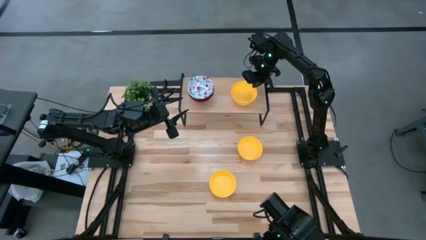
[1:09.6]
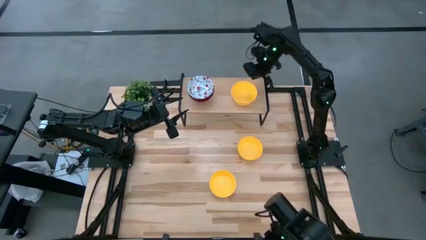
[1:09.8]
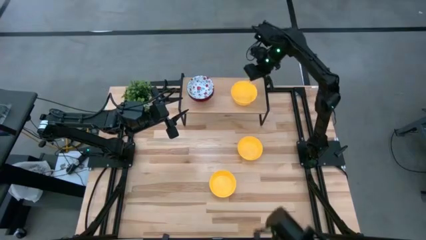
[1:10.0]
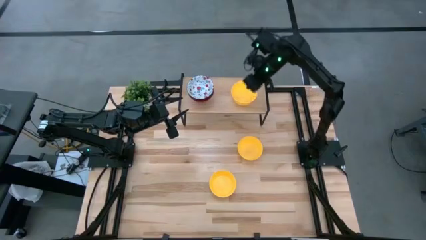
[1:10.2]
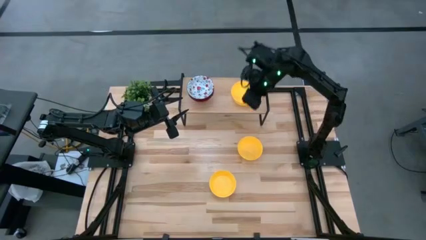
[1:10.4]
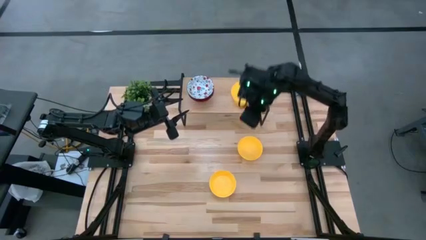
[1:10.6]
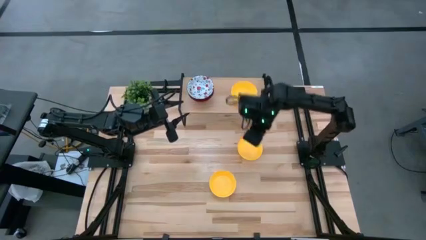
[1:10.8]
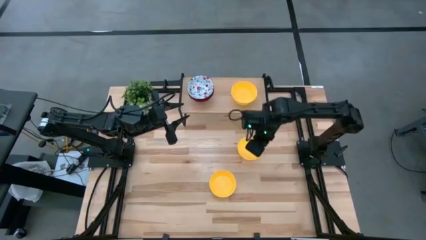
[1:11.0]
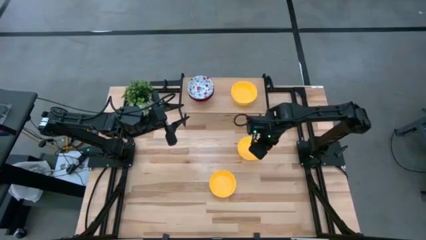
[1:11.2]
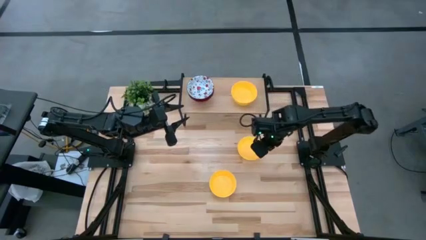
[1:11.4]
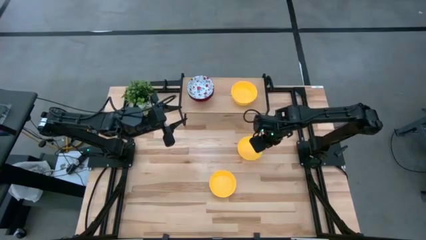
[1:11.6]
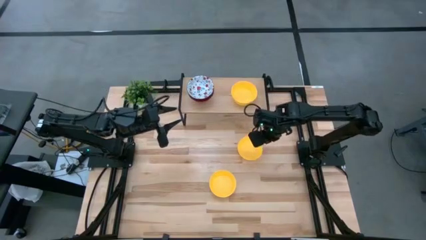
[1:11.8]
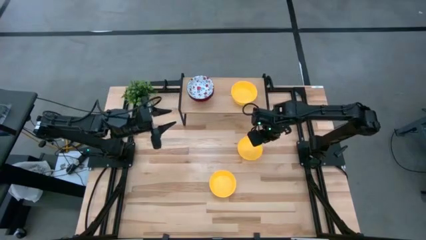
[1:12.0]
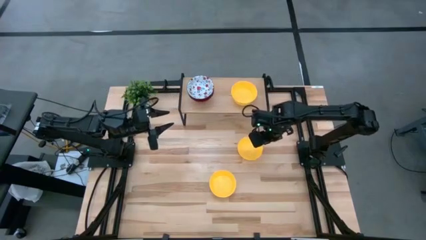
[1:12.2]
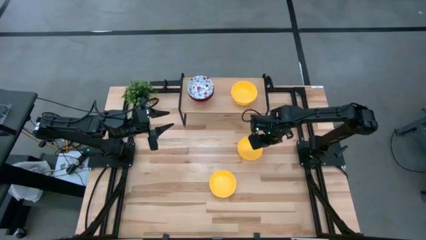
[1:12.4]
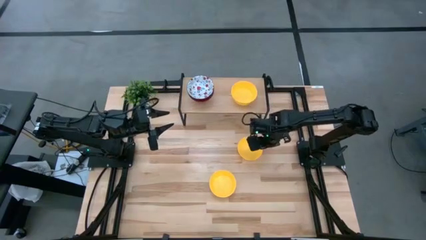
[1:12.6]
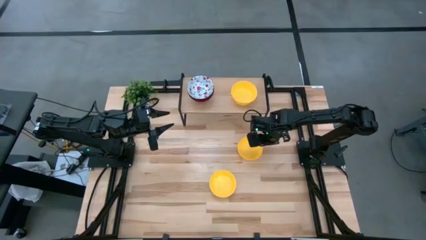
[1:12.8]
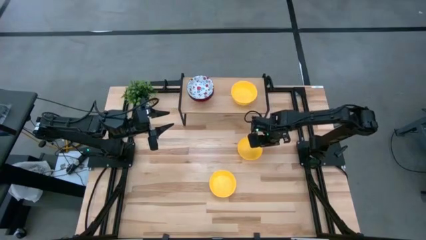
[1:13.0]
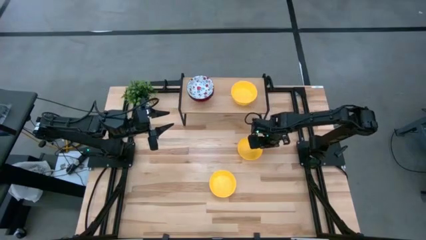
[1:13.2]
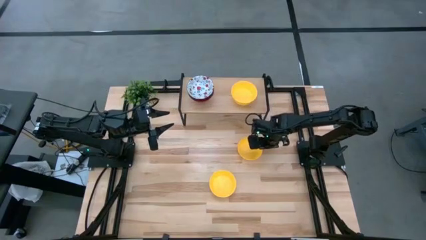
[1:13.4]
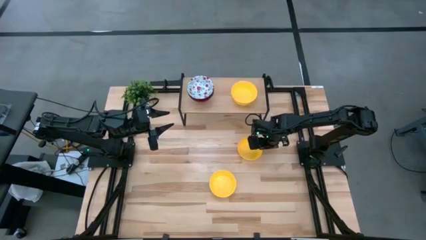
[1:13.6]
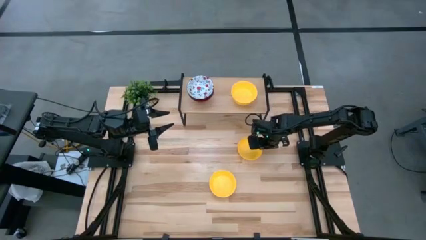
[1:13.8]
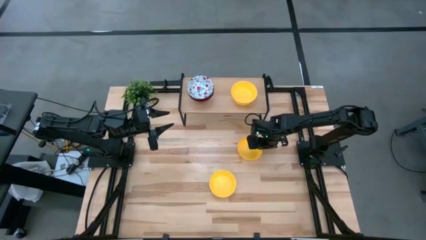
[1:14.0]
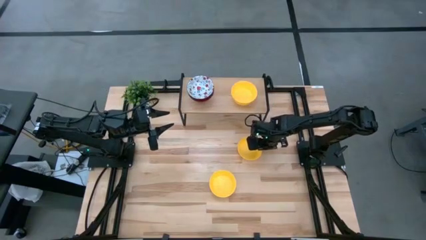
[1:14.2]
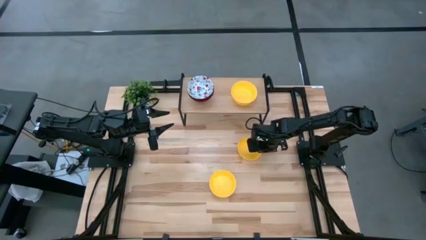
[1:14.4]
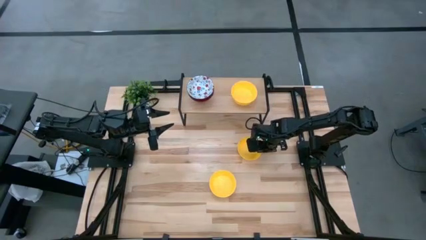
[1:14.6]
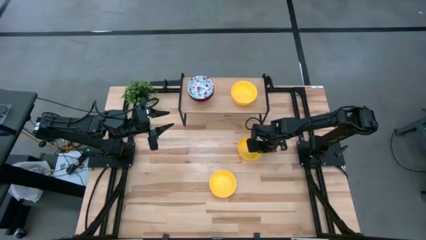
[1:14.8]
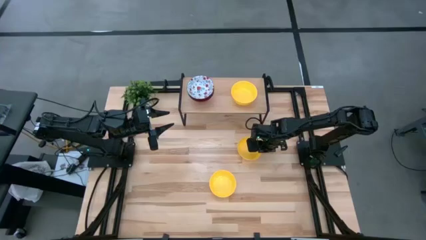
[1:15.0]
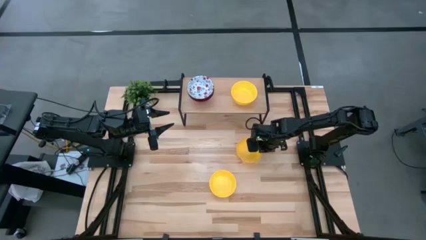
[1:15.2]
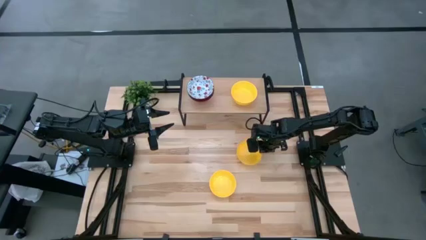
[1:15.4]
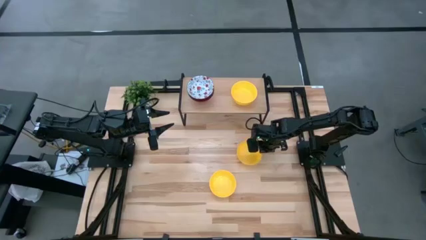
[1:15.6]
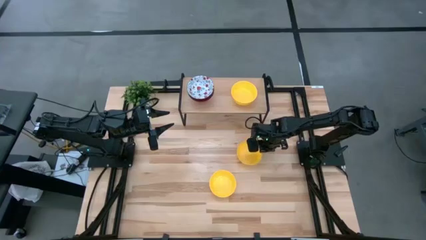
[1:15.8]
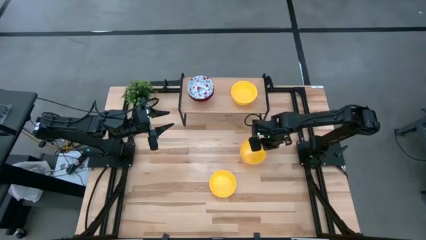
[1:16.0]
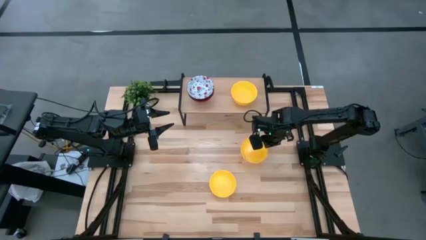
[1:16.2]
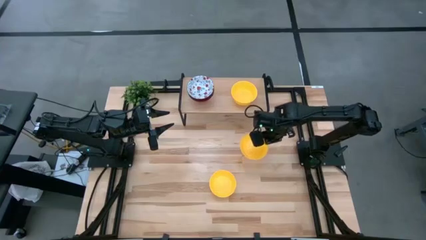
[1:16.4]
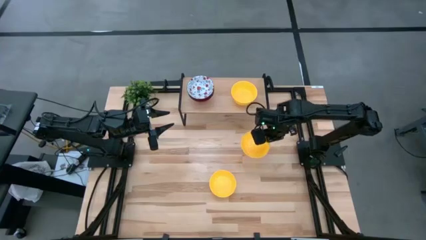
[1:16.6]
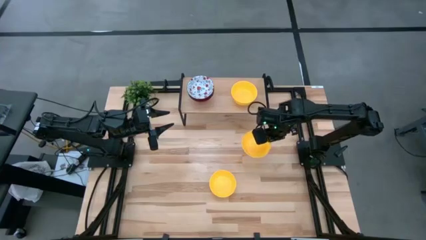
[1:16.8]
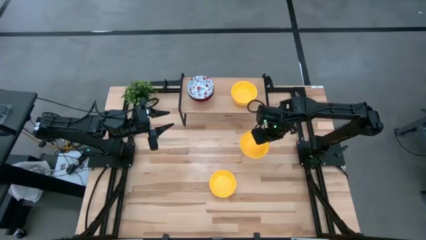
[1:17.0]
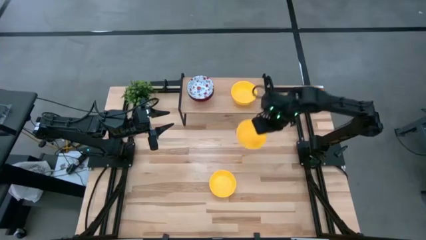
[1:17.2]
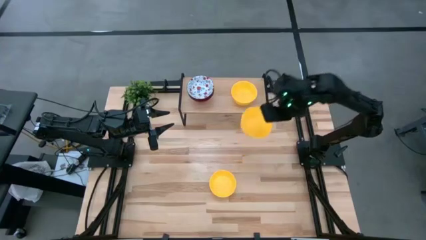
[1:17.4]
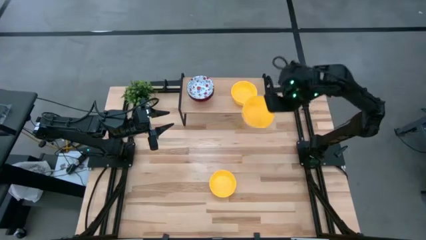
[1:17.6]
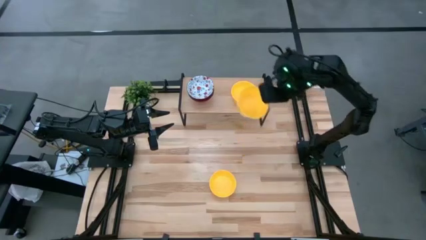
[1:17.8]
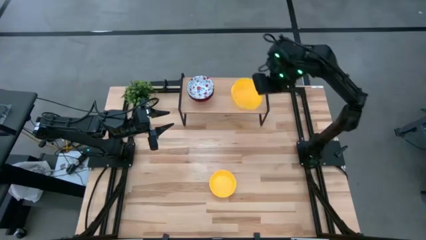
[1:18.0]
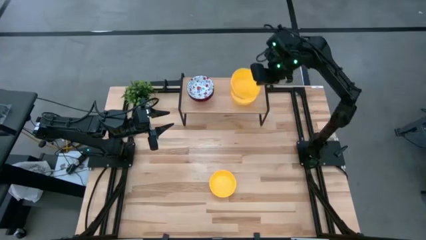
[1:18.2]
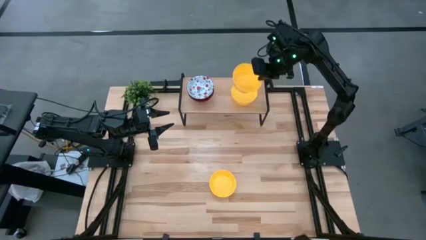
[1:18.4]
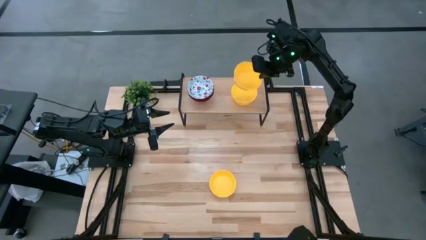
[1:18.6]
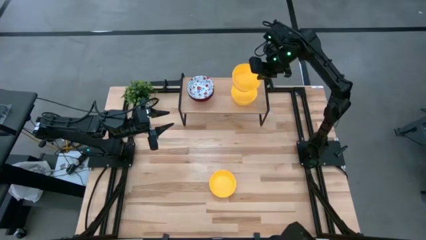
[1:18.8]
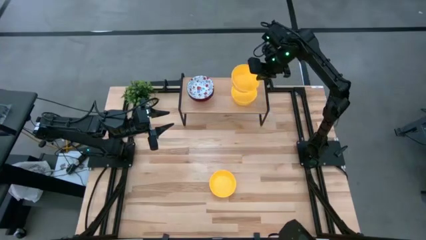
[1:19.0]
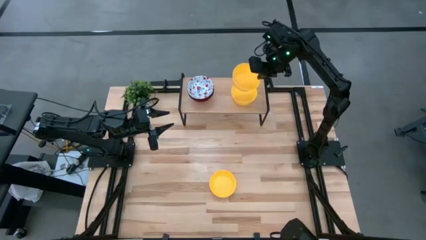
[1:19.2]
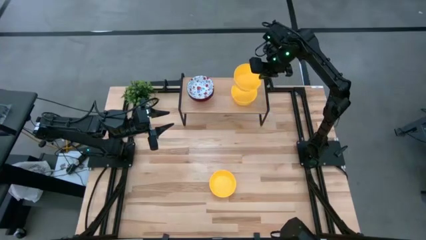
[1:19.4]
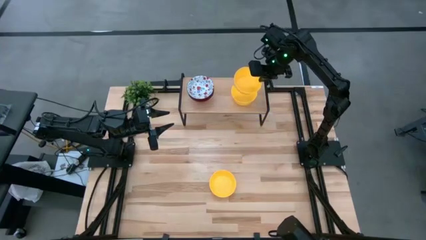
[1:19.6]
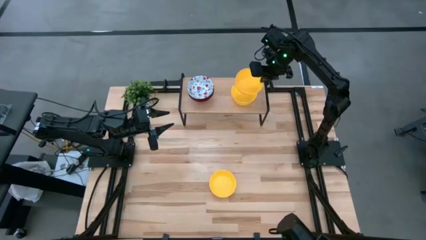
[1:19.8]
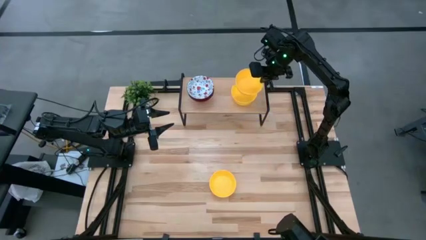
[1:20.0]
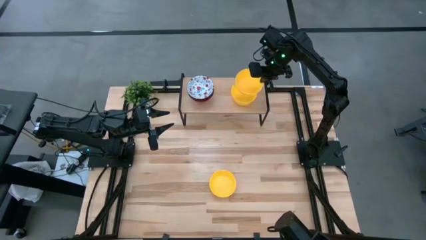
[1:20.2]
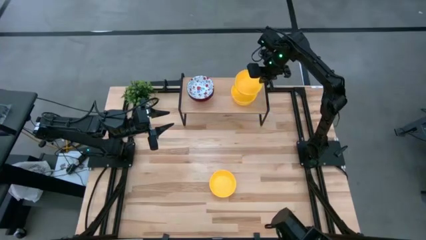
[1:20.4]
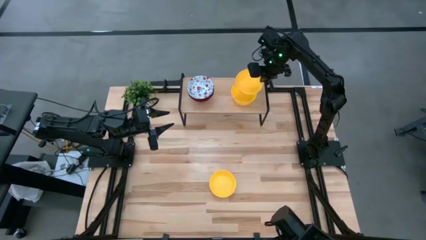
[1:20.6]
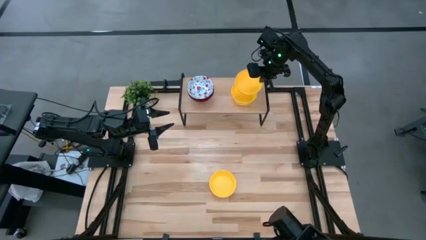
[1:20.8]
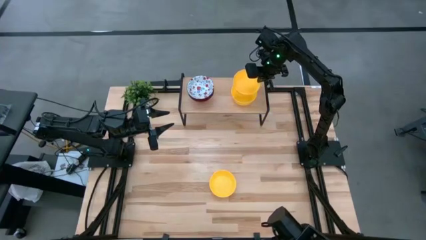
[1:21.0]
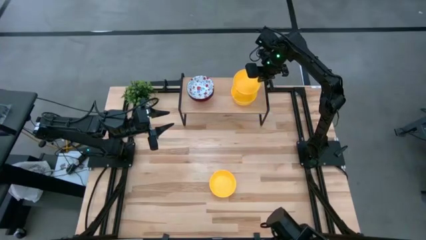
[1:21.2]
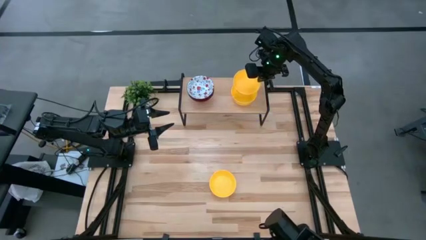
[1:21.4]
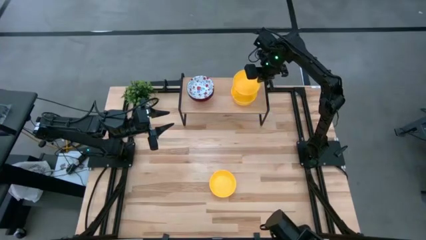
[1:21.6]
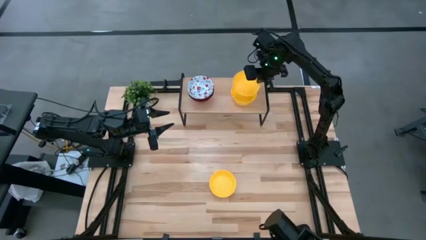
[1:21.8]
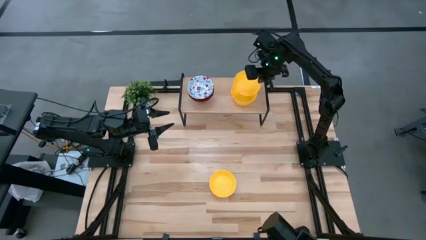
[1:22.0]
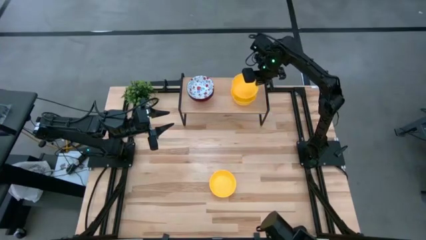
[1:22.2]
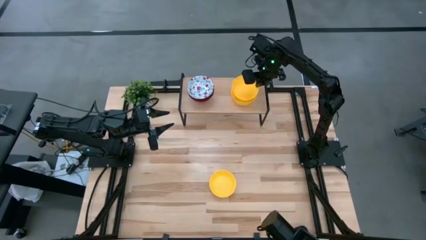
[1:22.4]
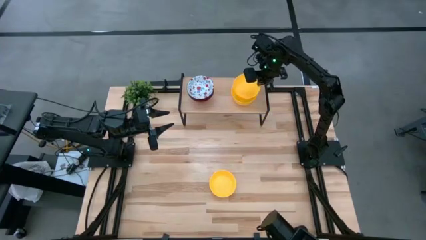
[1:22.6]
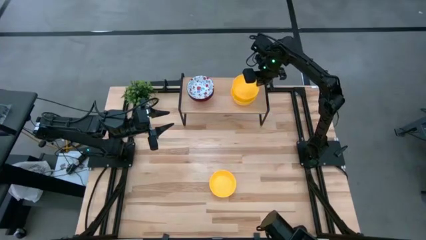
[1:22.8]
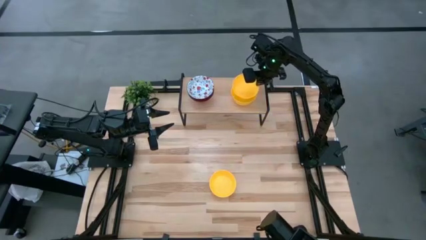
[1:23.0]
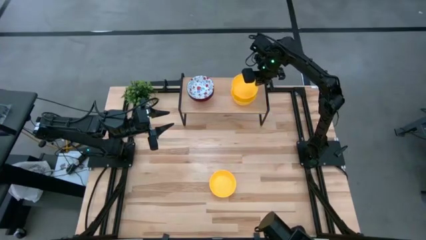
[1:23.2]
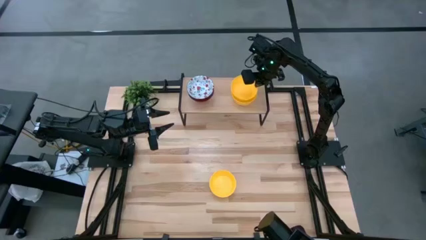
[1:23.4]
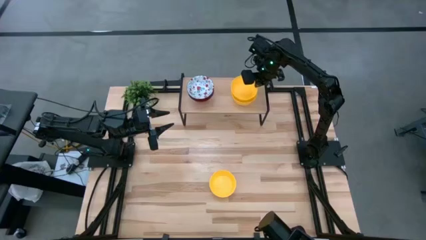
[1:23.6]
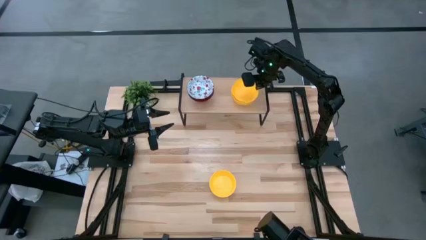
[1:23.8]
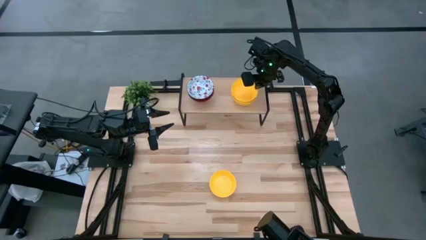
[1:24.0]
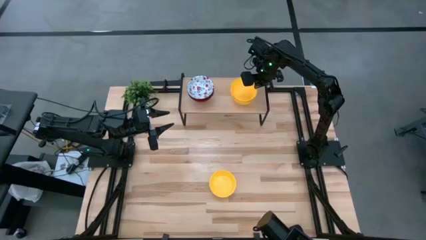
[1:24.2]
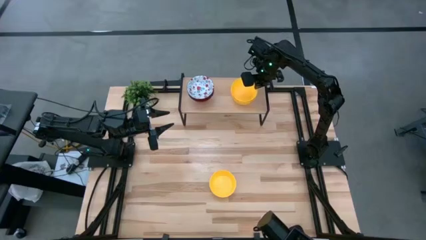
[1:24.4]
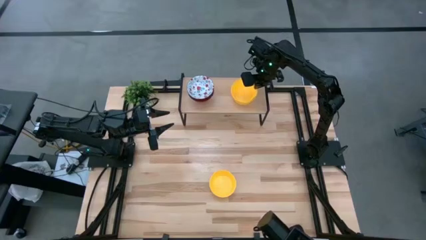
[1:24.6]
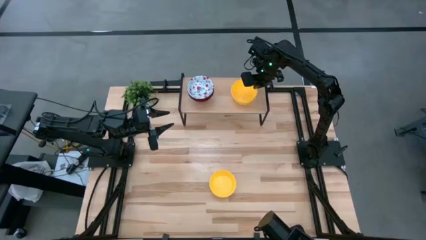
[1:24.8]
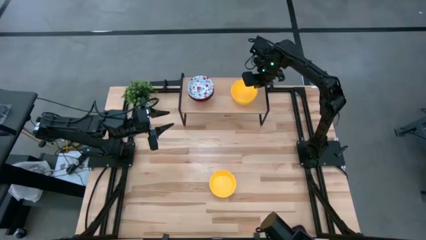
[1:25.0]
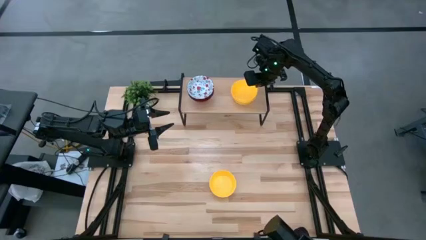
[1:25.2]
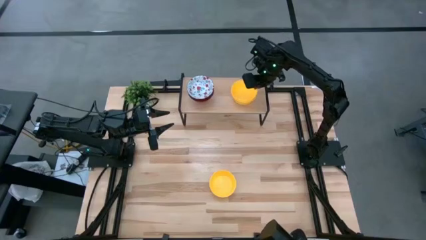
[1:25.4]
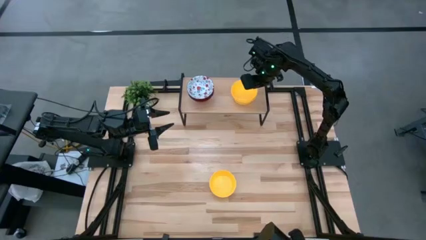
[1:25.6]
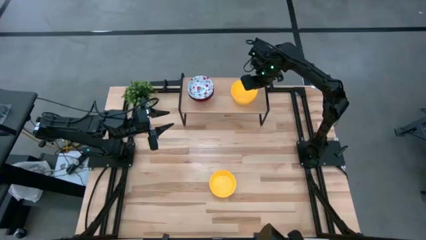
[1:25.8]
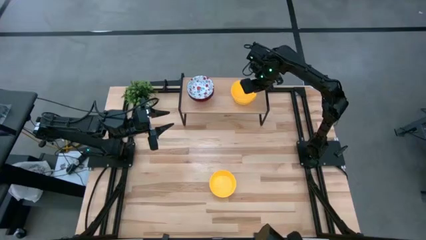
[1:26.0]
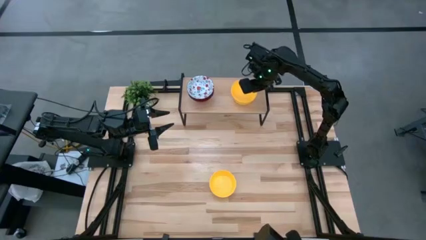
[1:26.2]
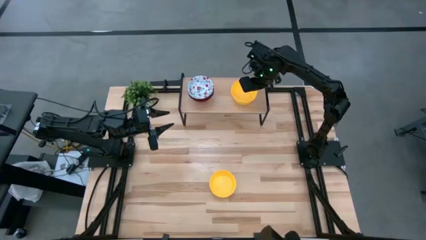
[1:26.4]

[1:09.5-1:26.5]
Task: Pick & Place Mini bowls
Stack the top yellow bowl on the yellow bowl on the shelf
